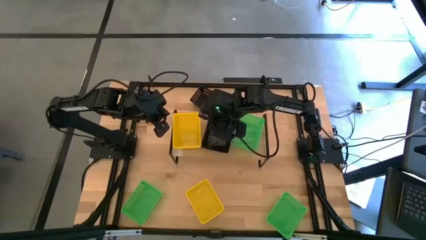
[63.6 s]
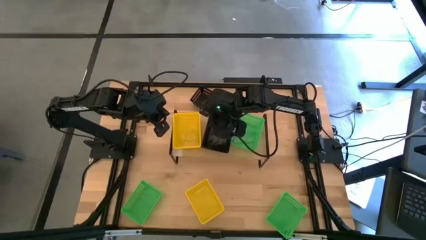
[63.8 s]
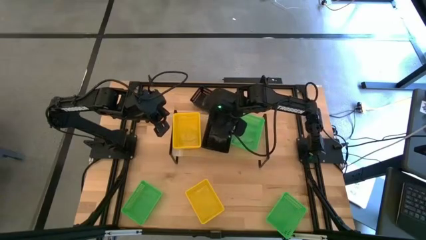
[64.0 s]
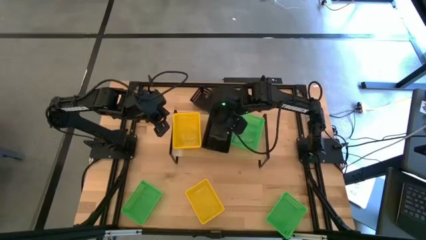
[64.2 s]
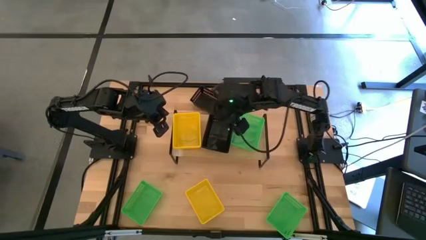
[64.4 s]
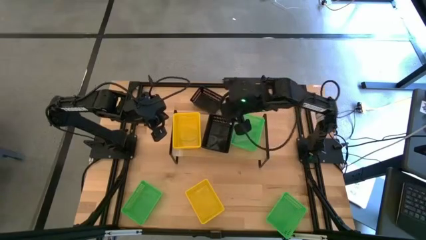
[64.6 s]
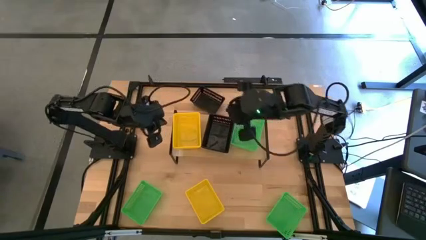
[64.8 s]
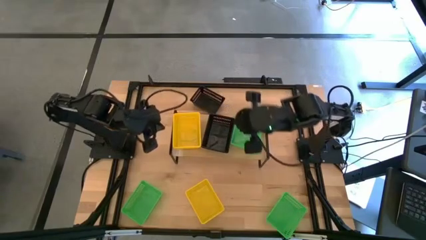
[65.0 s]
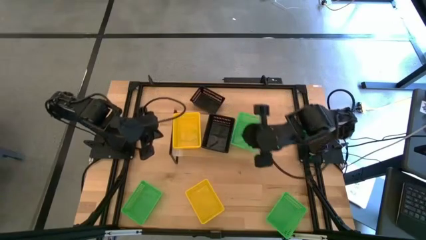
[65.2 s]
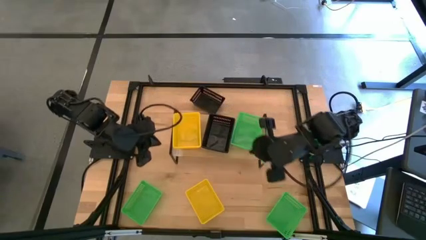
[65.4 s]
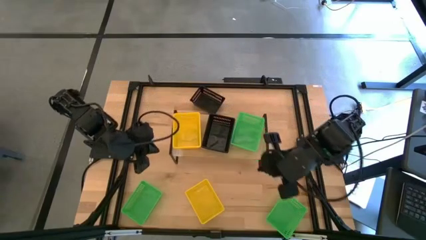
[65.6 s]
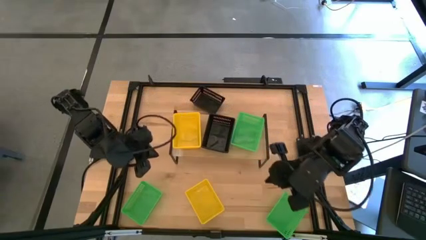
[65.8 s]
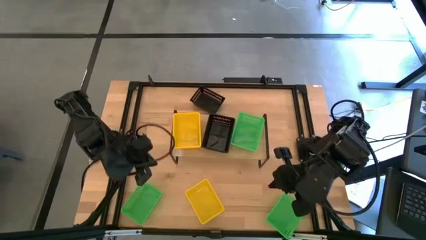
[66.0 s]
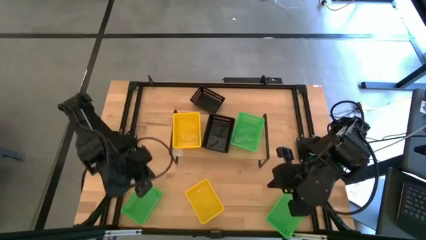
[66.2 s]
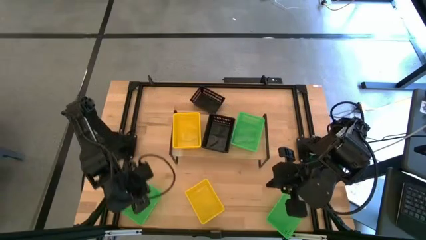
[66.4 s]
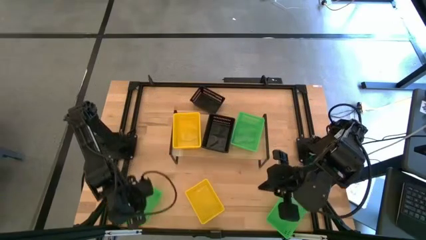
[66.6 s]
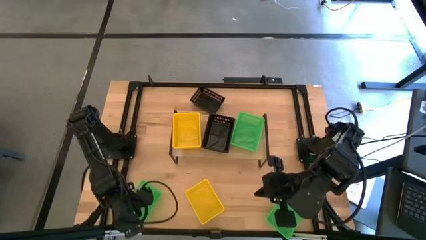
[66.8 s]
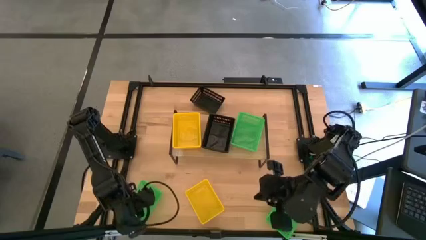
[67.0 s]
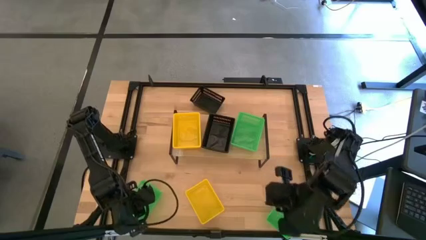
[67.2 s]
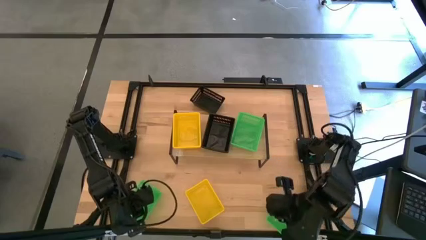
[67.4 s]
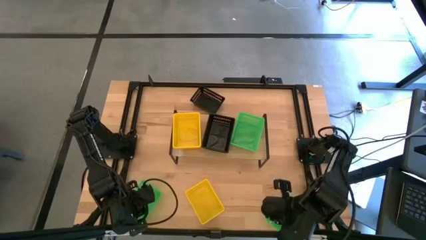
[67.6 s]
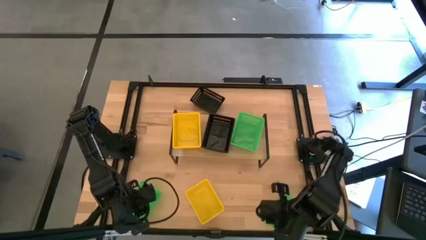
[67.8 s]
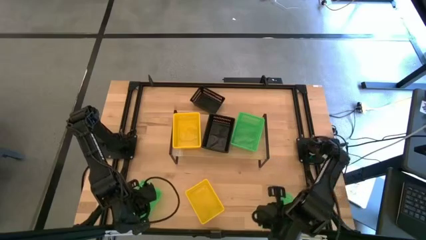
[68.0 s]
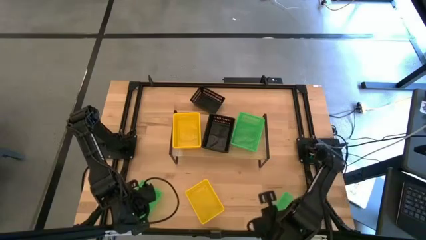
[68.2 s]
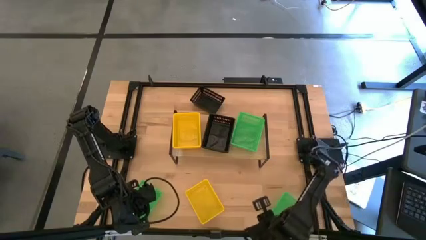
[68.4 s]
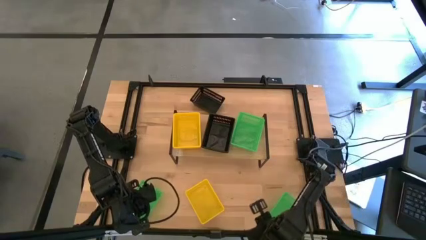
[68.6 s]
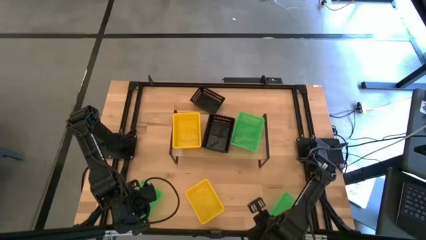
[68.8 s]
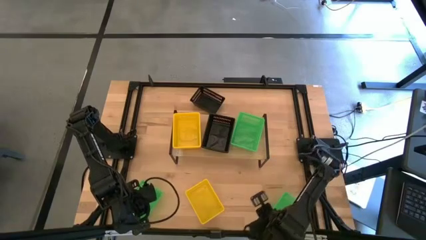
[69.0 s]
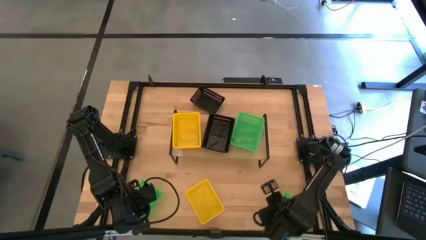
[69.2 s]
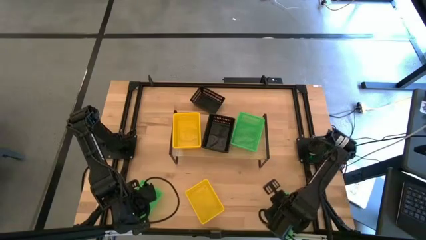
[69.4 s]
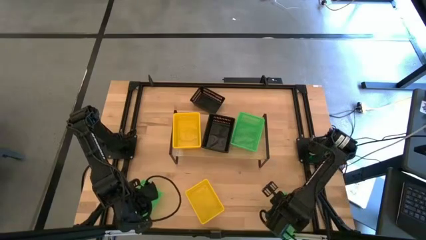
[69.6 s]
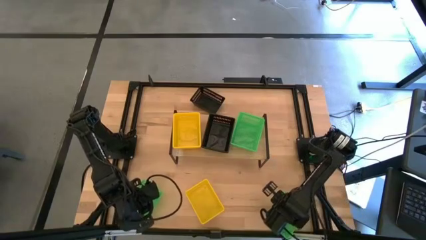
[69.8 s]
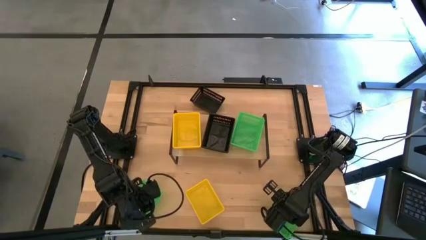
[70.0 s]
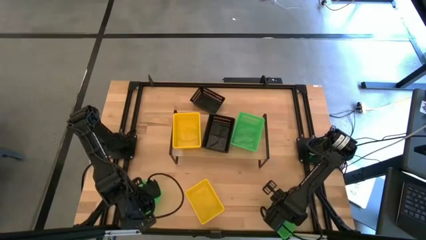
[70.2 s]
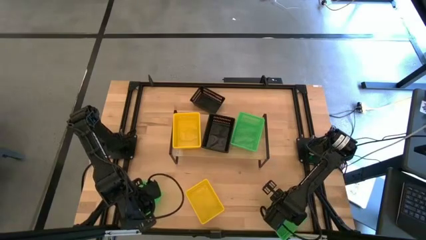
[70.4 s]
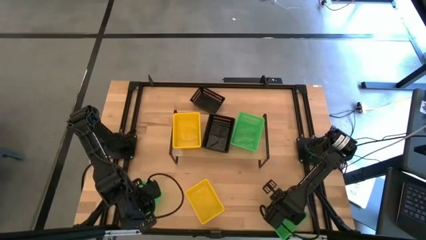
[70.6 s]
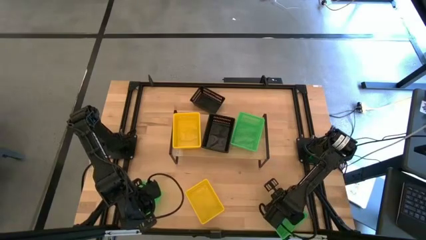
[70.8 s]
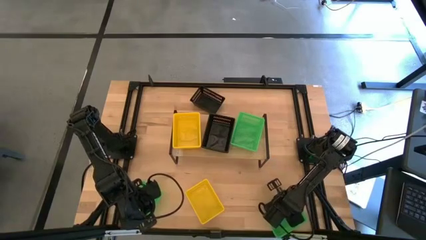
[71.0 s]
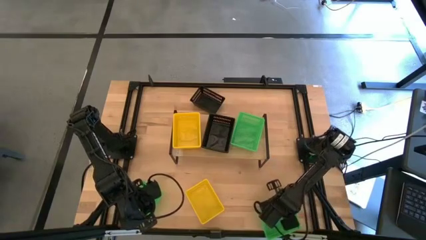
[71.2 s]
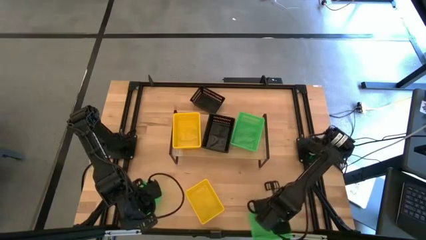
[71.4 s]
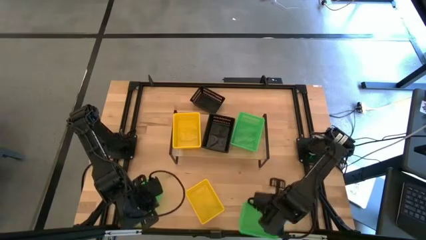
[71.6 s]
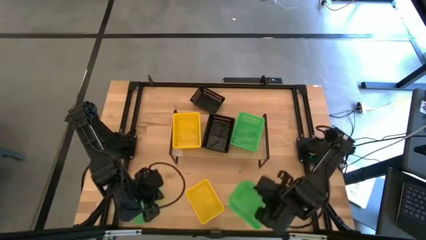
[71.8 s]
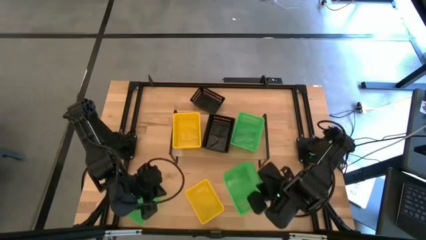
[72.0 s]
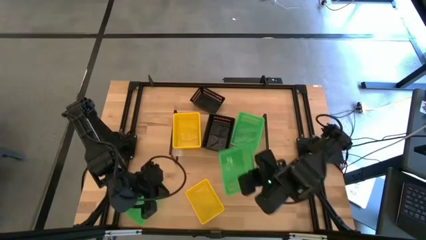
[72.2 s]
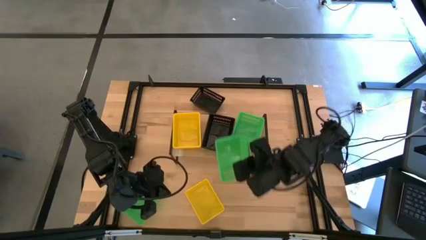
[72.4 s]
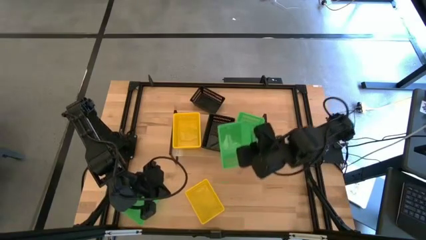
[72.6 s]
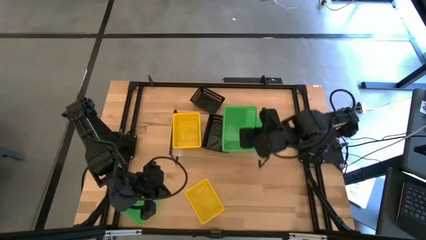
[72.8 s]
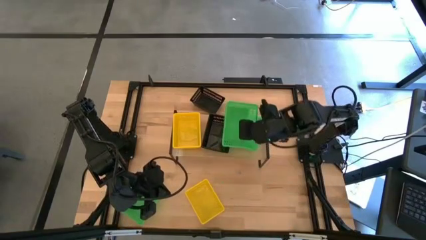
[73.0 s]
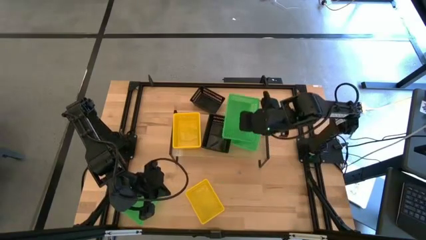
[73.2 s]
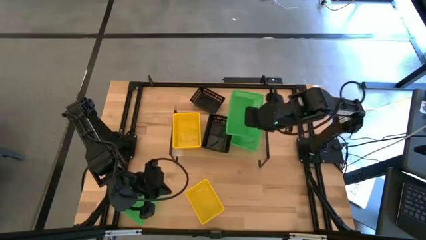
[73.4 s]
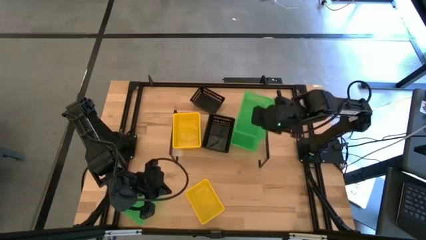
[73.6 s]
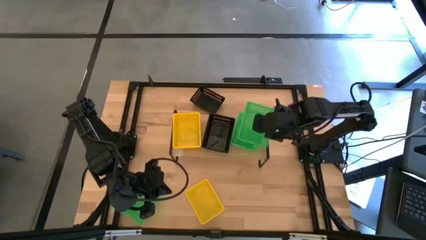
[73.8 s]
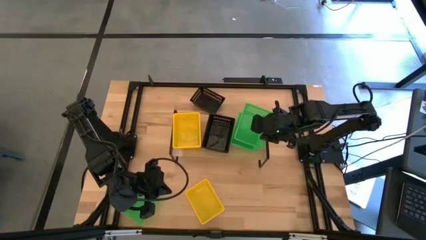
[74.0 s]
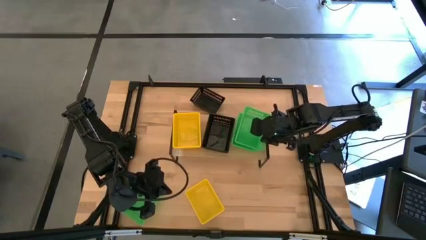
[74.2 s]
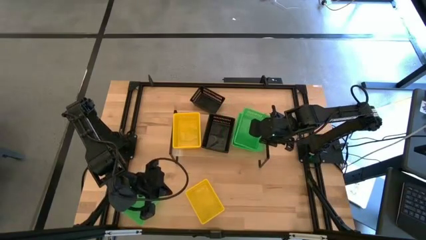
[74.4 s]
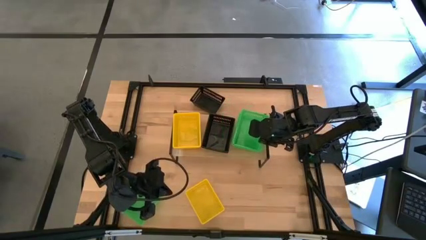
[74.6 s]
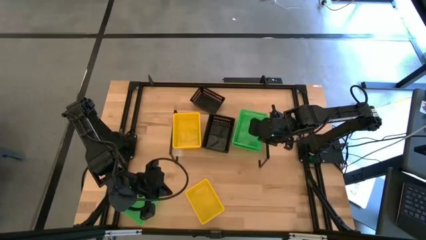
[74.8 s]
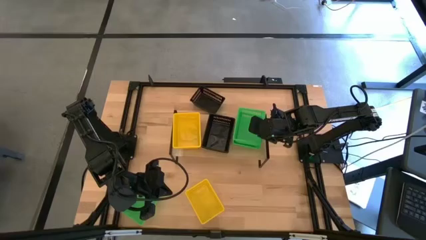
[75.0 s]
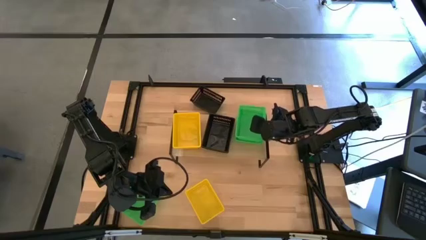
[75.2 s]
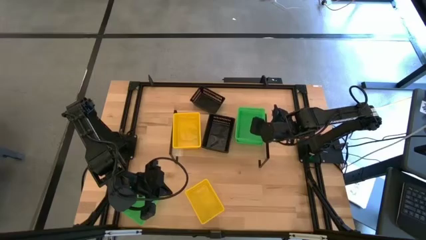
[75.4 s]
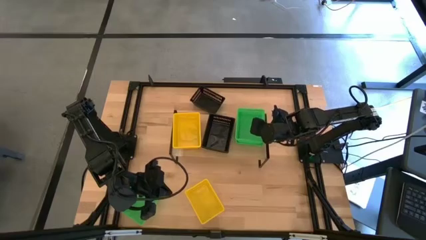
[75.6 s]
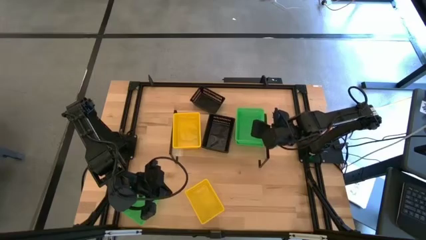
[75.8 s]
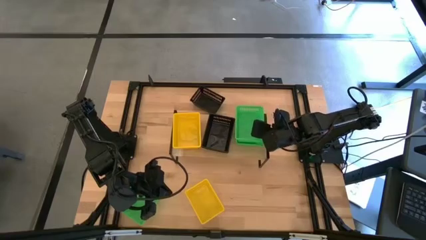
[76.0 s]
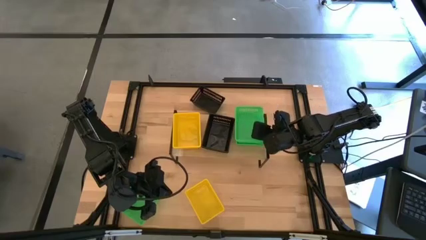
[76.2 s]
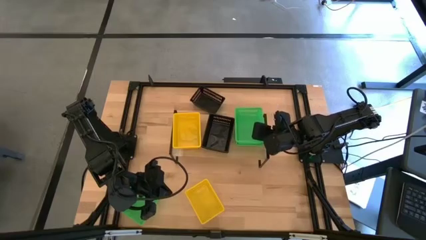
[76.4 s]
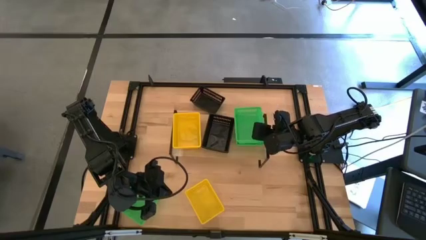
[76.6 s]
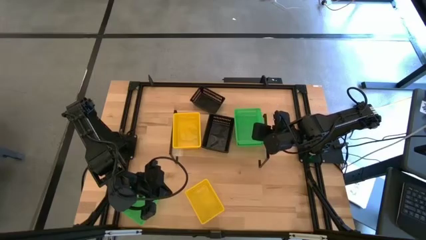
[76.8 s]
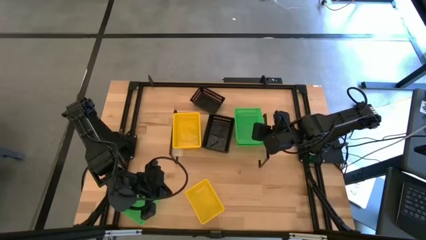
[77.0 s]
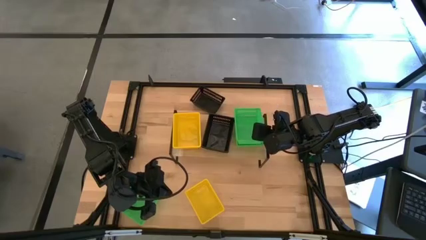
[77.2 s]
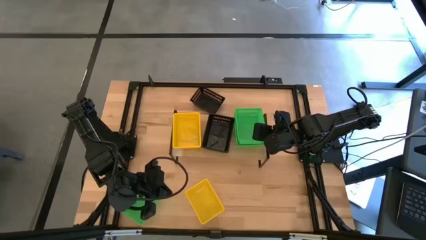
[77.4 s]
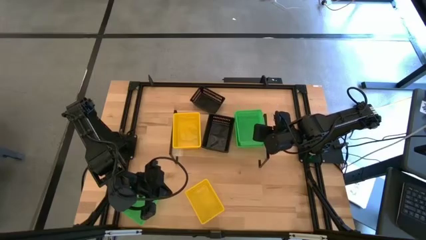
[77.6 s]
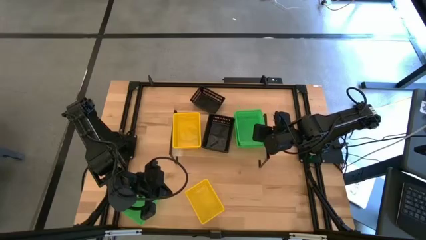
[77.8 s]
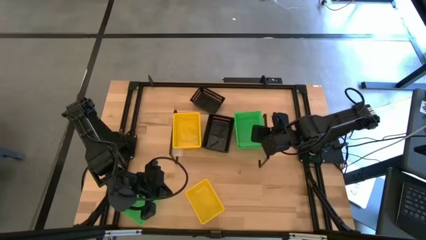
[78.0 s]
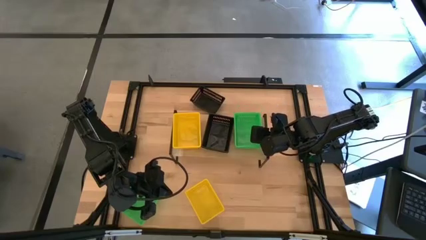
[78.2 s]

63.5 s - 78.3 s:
Task: Stack baskets on shelf by color
Stack the right green bin on the other green bin on the shelf

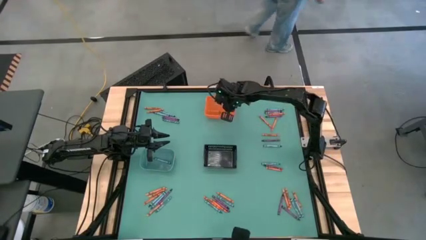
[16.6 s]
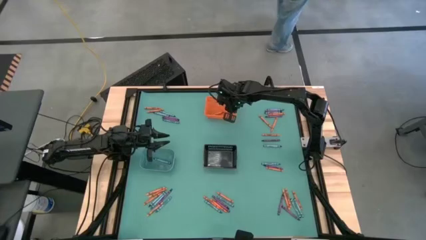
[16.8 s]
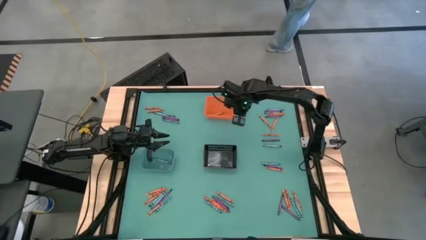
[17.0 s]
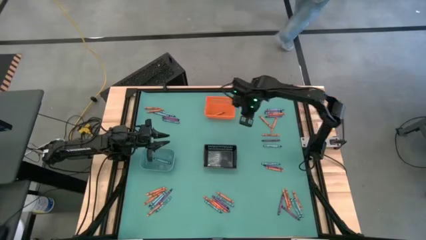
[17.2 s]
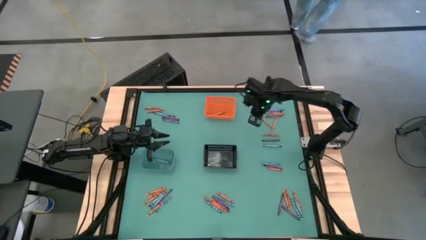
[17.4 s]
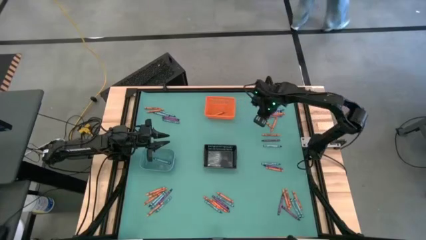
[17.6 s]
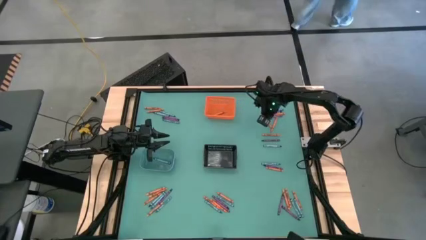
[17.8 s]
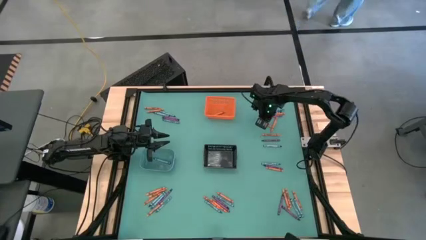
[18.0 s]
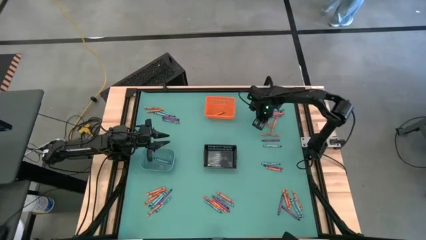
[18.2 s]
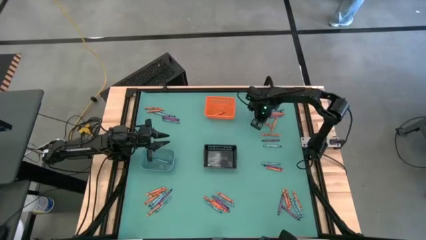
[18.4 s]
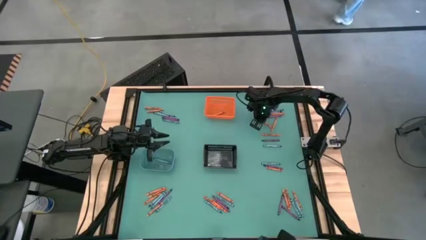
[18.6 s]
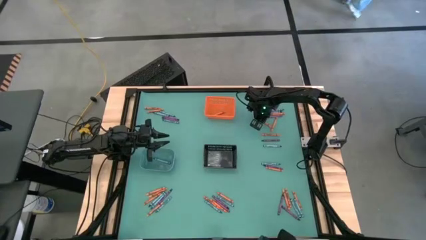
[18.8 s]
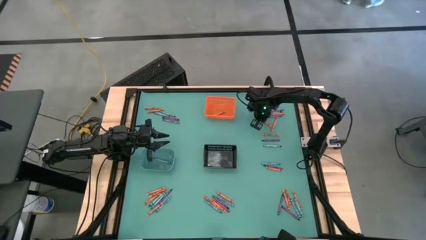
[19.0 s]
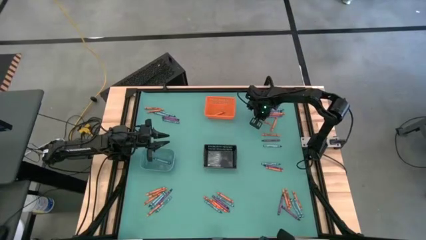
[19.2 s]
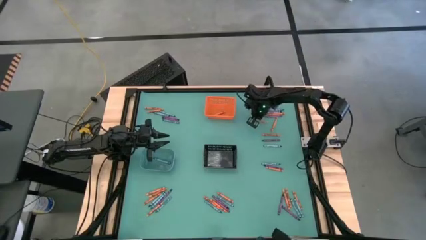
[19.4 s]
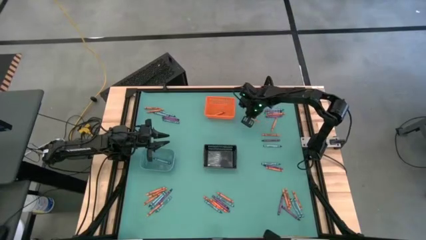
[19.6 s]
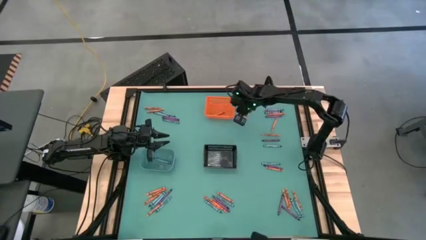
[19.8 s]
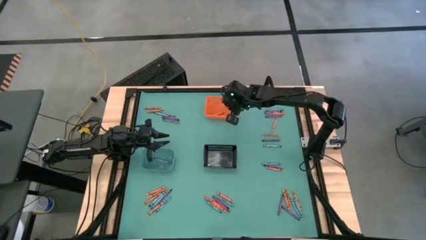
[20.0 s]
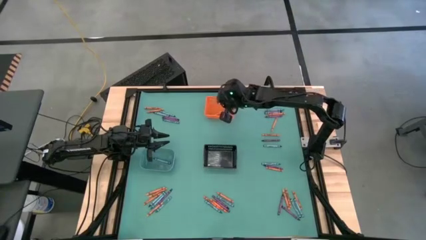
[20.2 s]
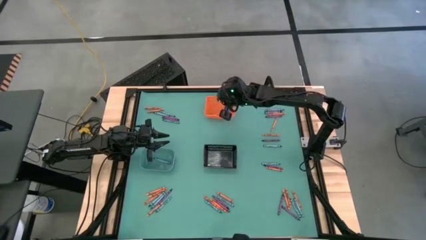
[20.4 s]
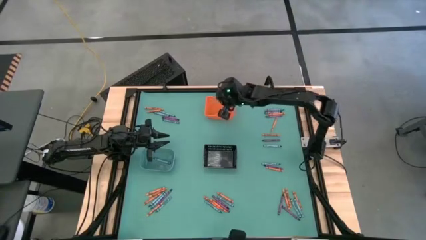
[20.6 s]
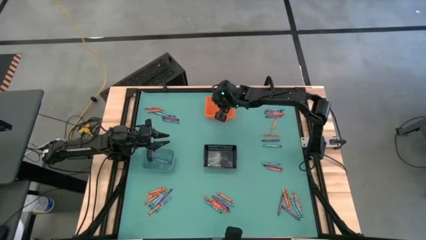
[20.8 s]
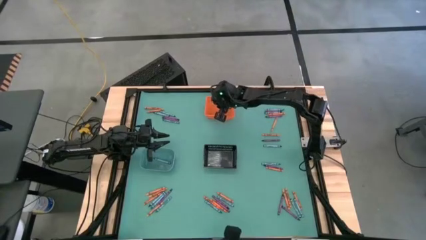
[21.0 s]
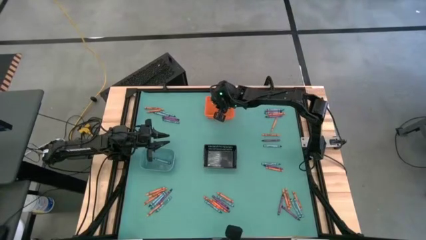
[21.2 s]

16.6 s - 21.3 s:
Task: Sort crayons
Put the orange crayon into the orange bin
